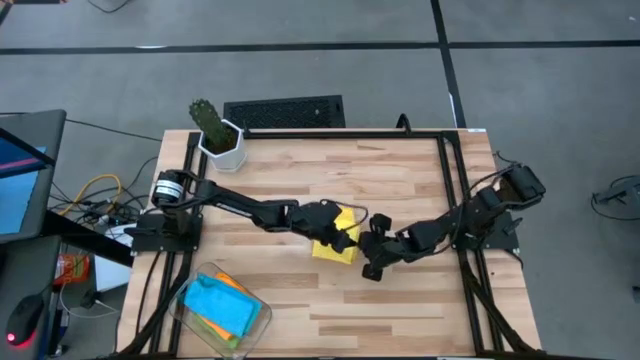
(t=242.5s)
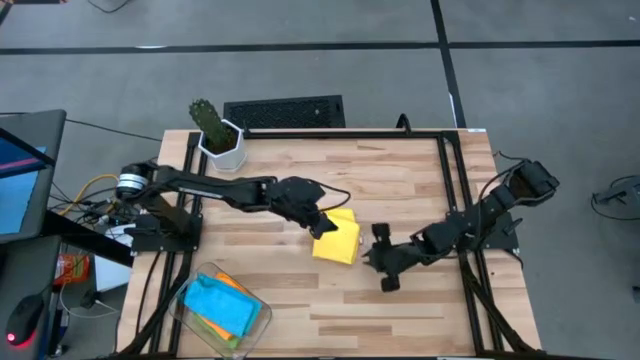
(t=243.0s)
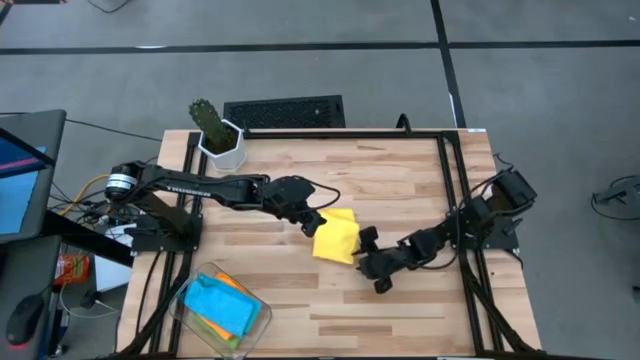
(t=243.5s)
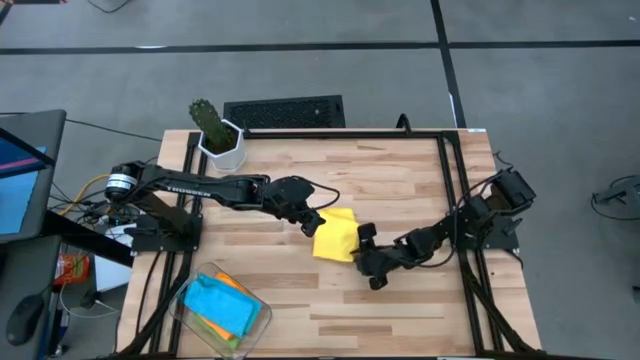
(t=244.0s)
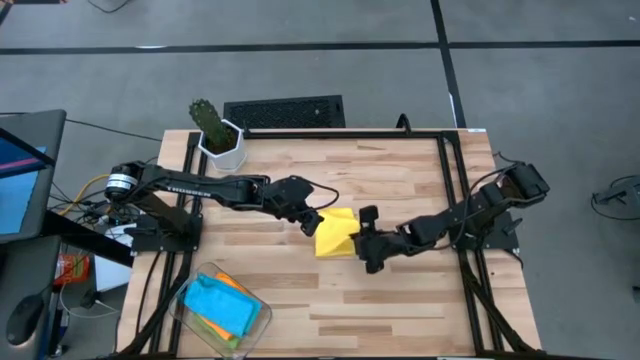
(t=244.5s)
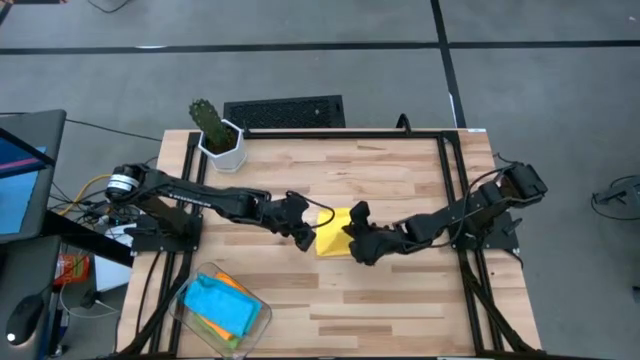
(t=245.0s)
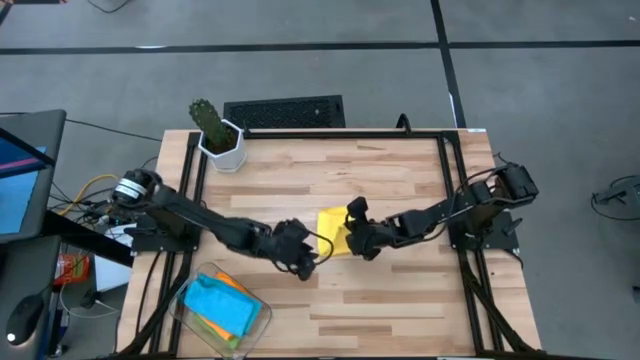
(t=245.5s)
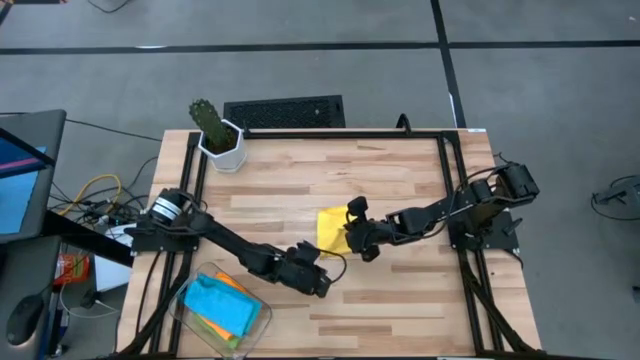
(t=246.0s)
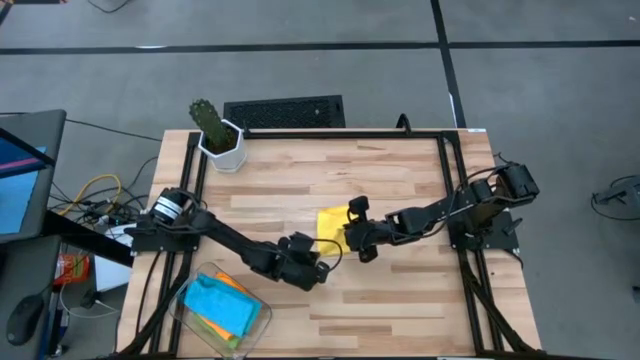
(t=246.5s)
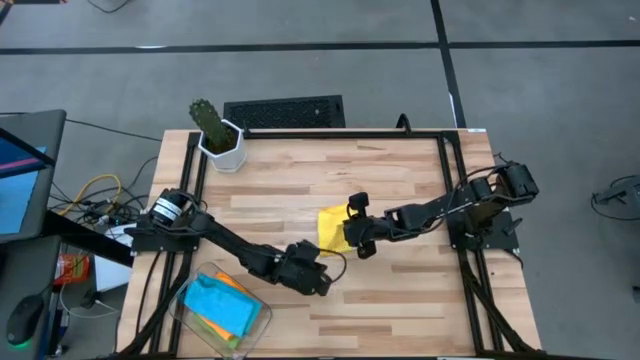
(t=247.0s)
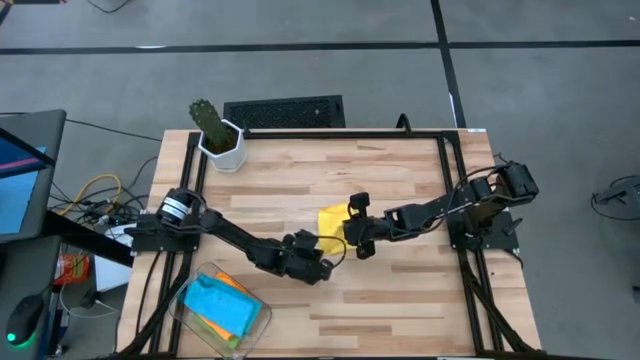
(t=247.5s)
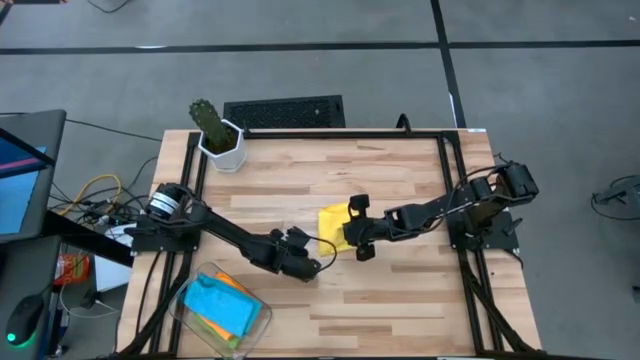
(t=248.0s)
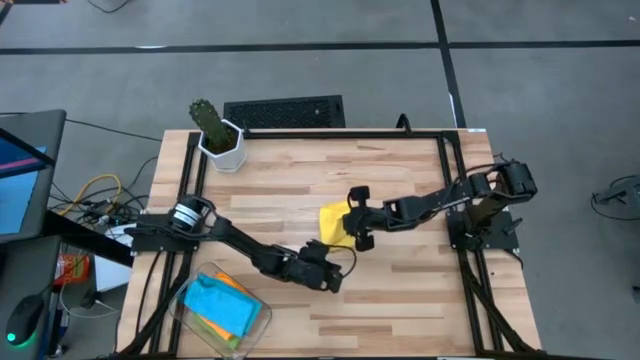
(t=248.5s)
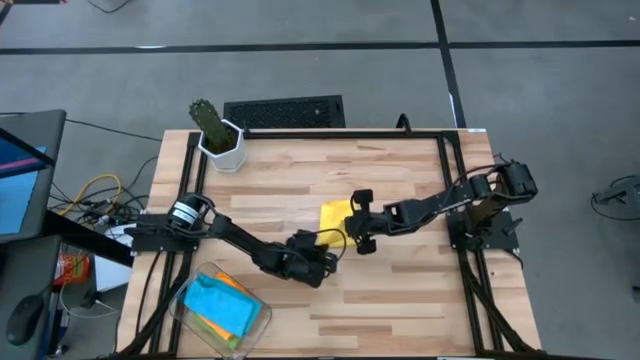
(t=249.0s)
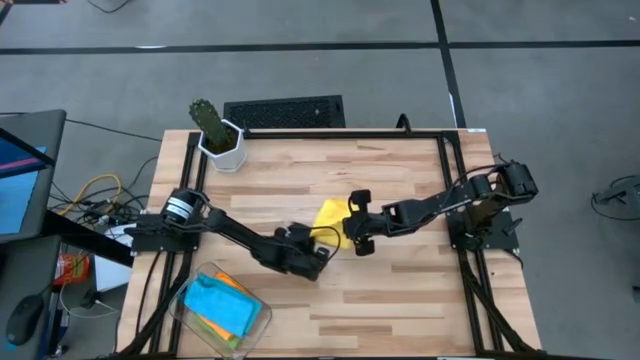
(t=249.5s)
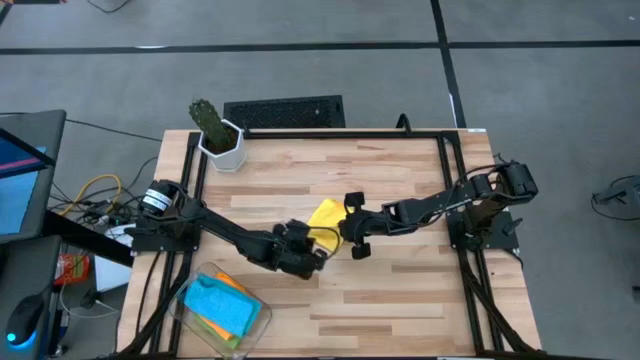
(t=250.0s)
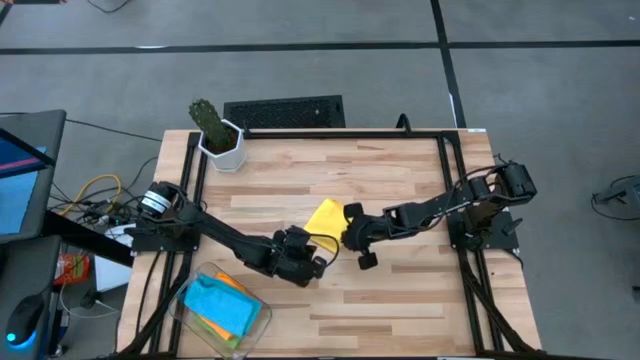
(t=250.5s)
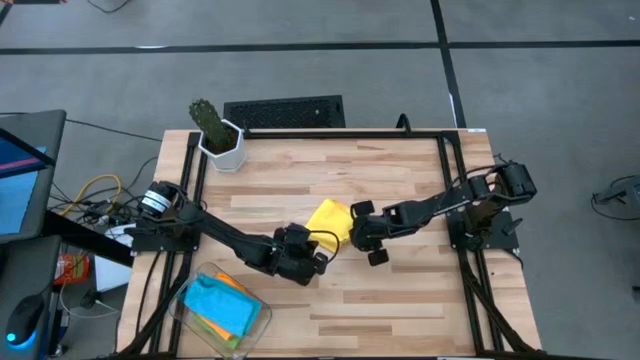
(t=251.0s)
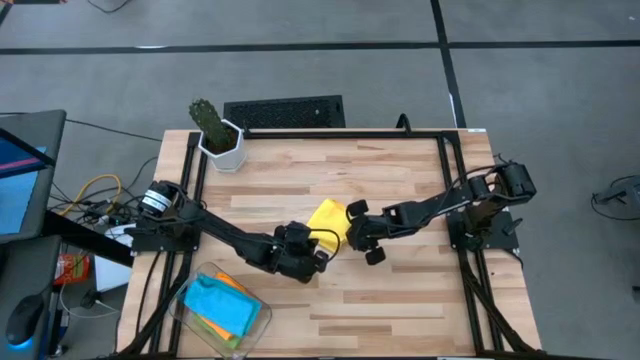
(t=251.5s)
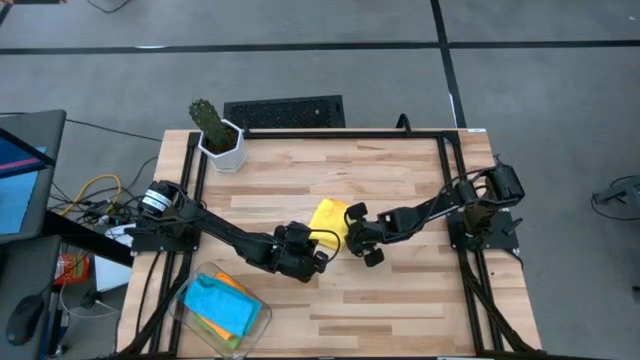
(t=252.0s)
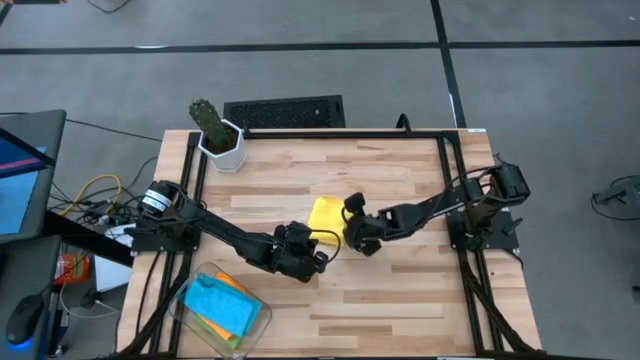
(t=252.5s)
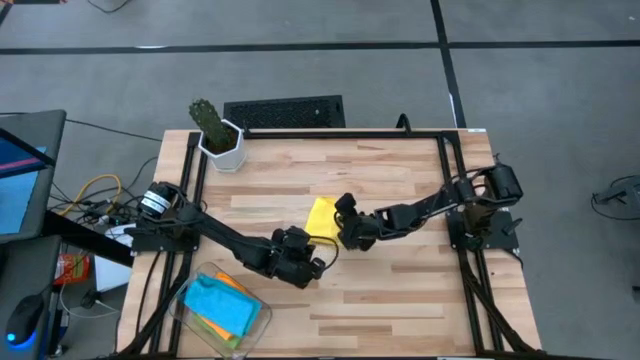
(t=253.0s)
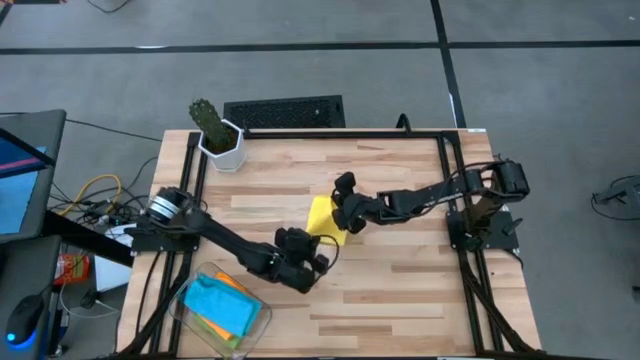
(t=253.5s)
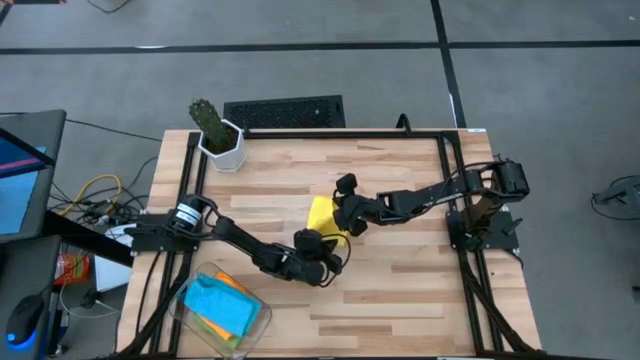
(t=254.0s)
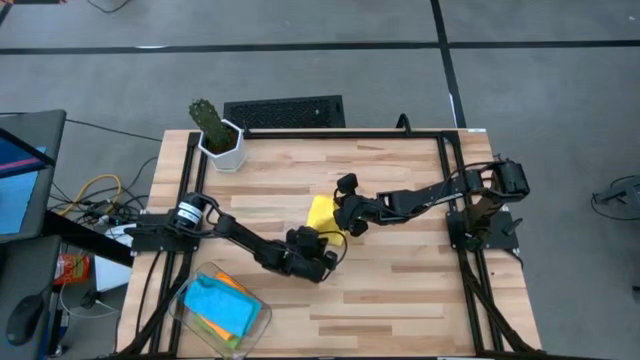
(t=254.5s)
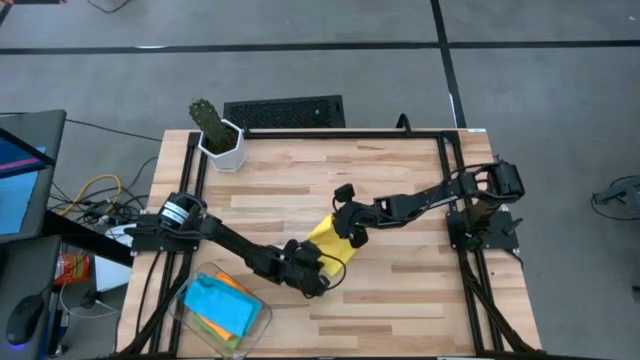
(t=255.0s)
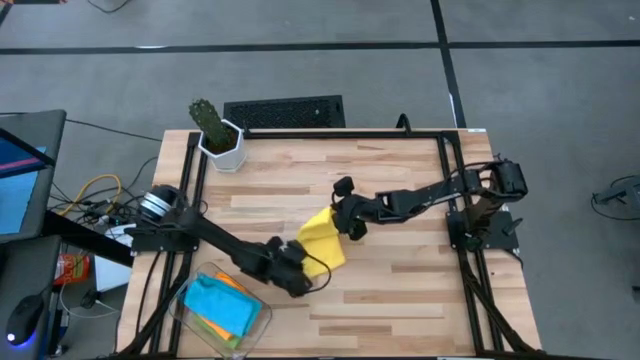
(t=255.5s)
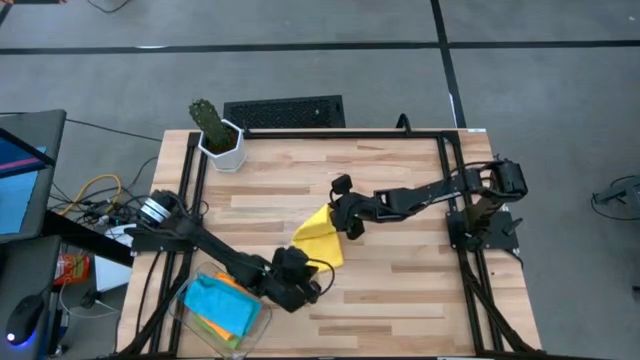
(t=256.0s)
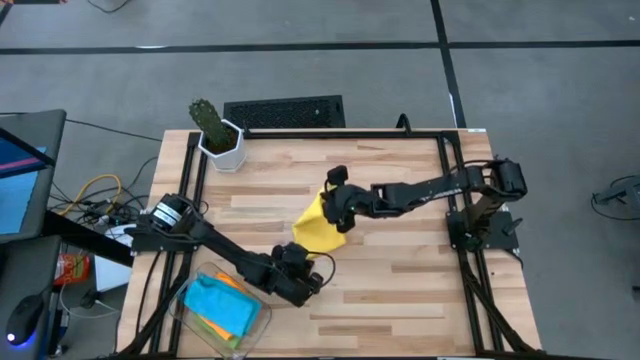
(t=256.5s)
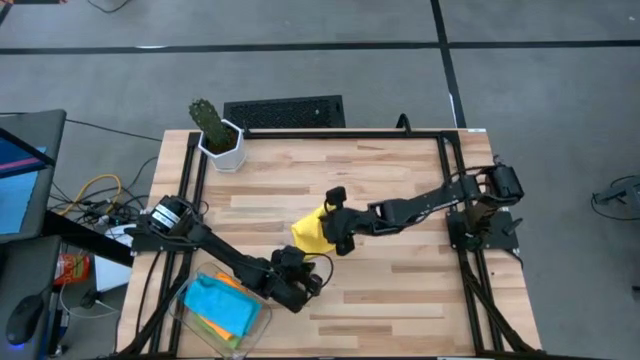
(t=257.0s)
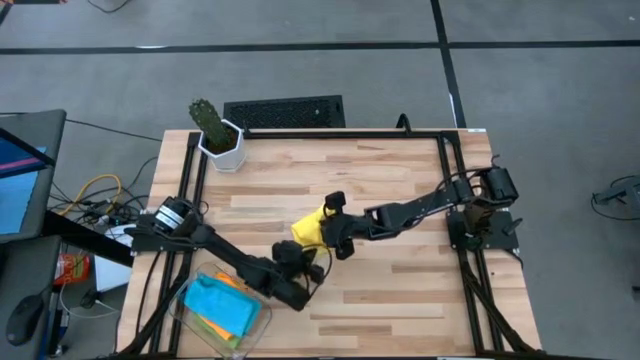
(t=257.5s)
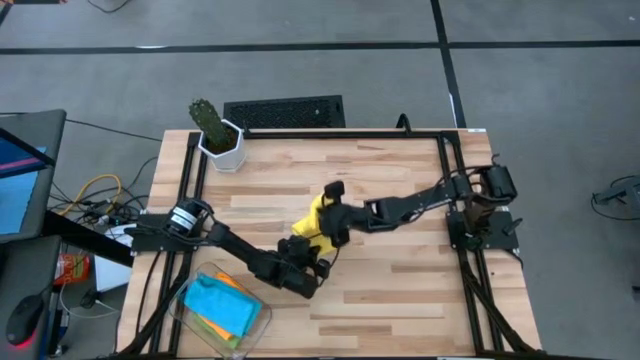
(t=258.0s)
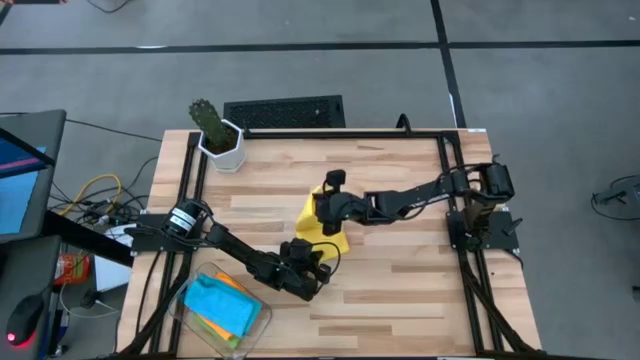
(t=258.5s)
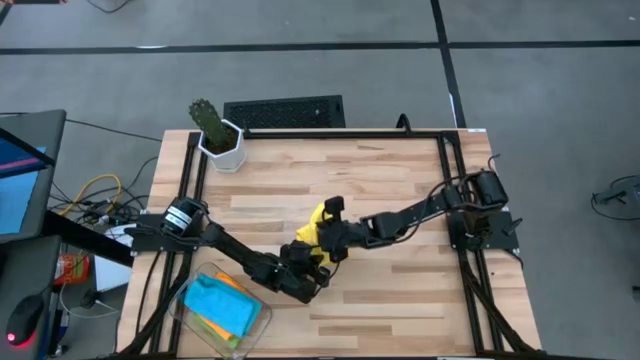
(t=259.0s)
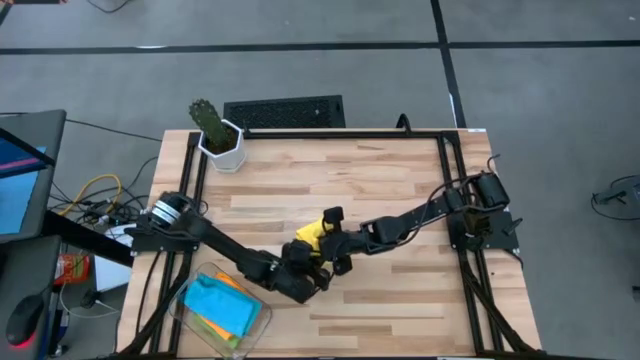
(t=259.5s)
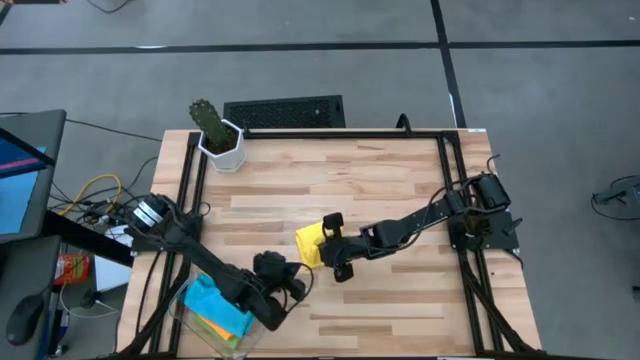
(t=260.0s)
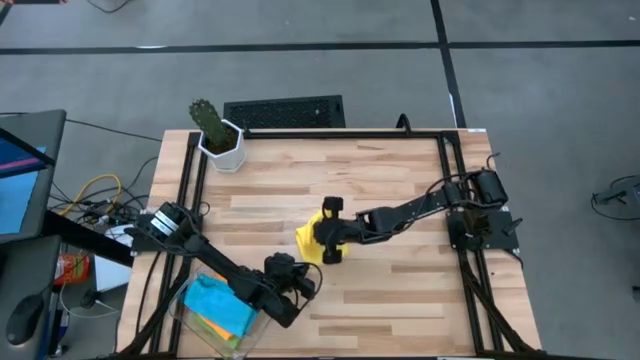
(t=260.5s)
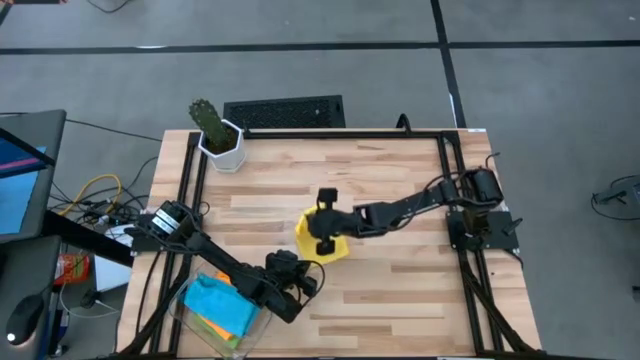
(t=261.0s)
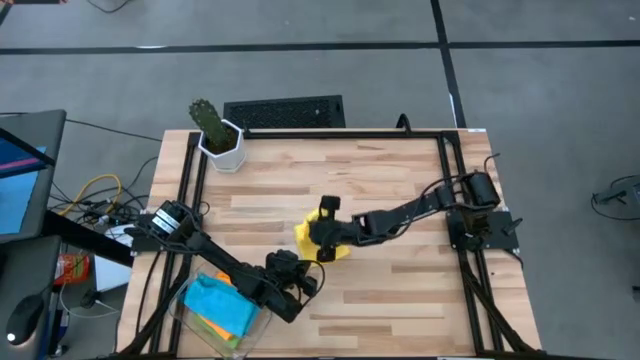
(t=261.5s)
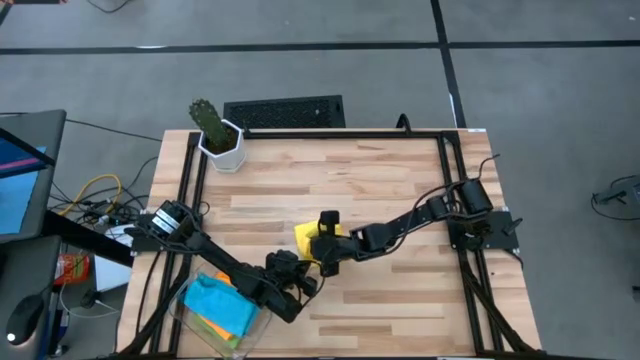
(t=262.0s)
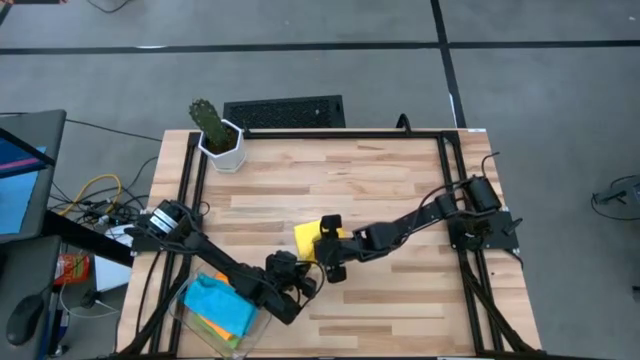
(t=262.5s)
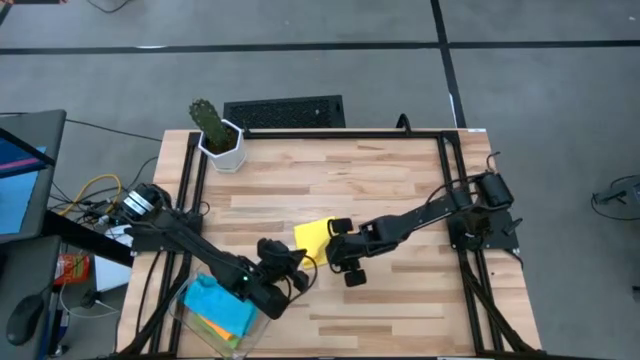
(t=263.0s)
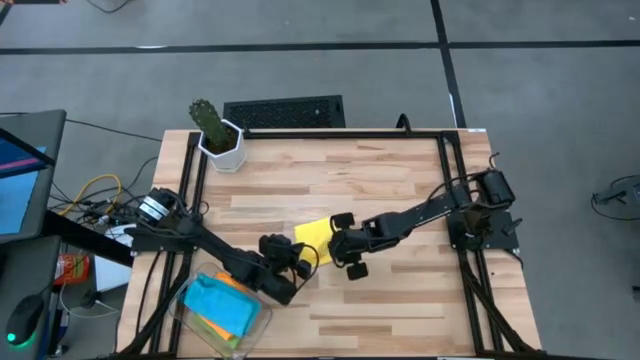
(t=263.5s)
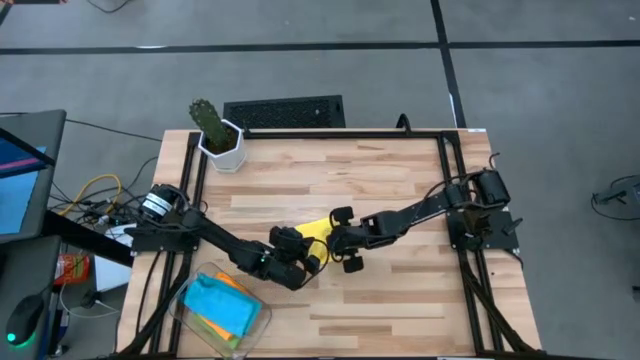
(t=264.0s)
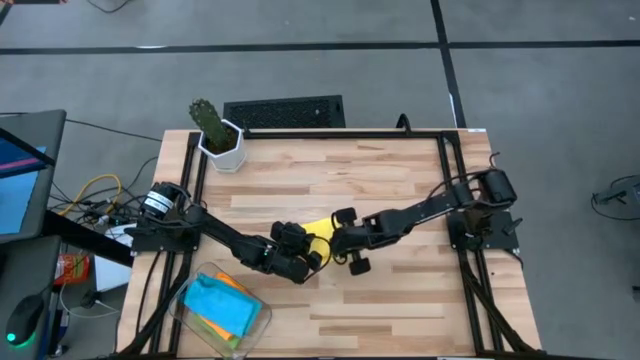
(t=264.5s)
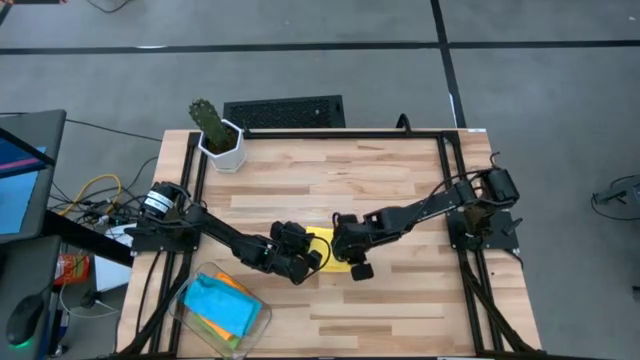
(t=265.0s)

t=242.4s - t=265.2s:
Task: Fold microfiber towels
Fold the yellow microfiber towel
